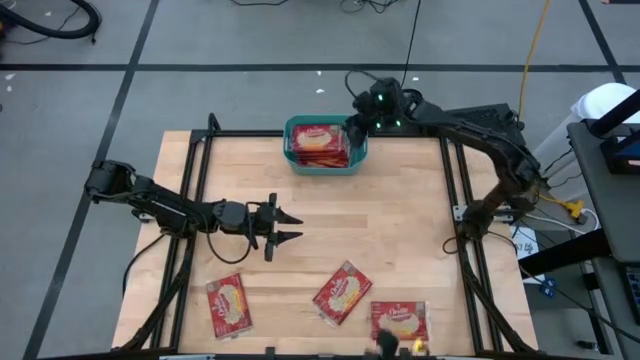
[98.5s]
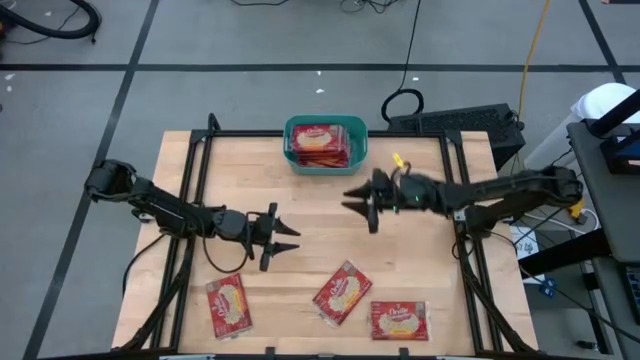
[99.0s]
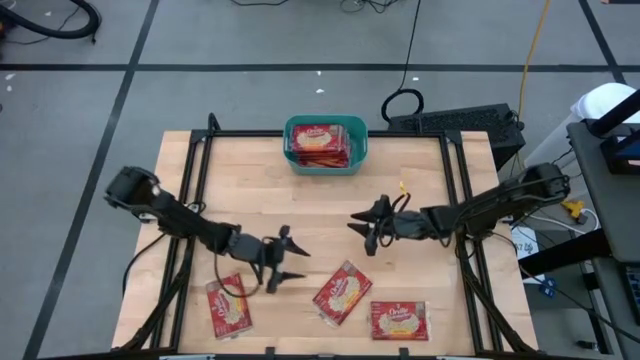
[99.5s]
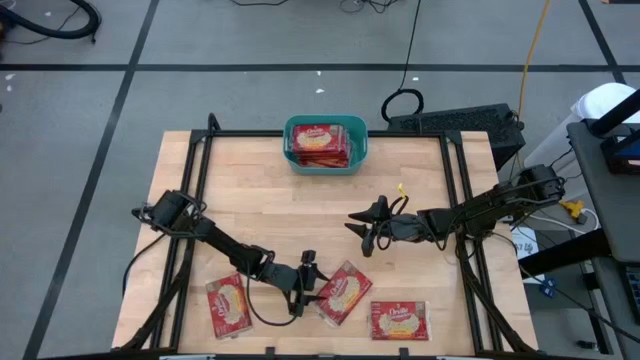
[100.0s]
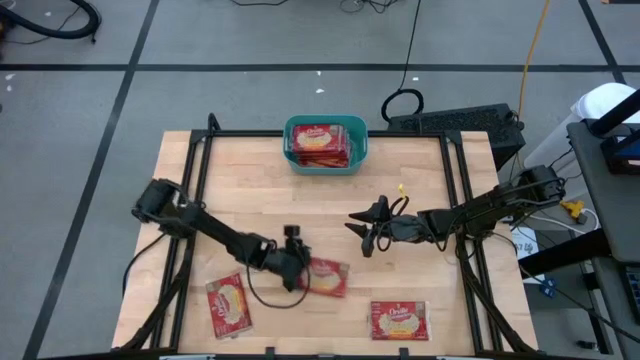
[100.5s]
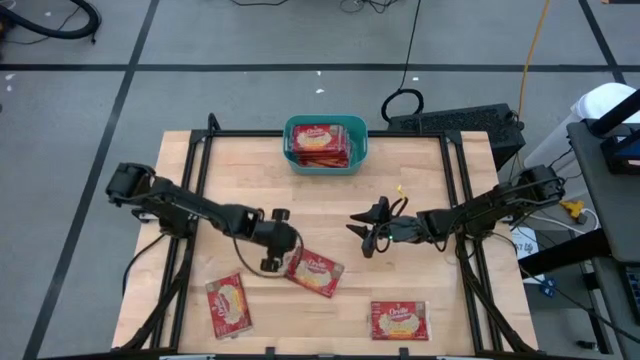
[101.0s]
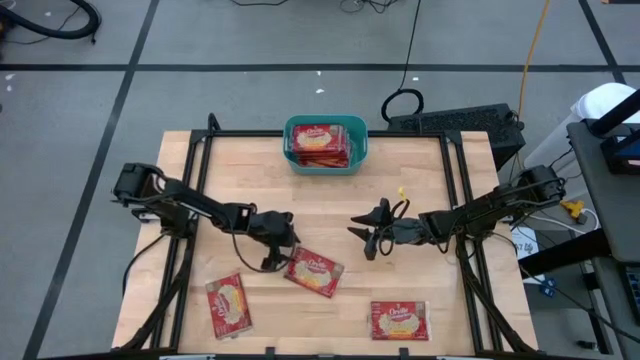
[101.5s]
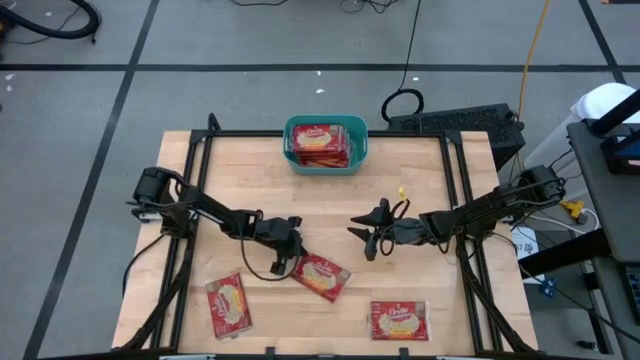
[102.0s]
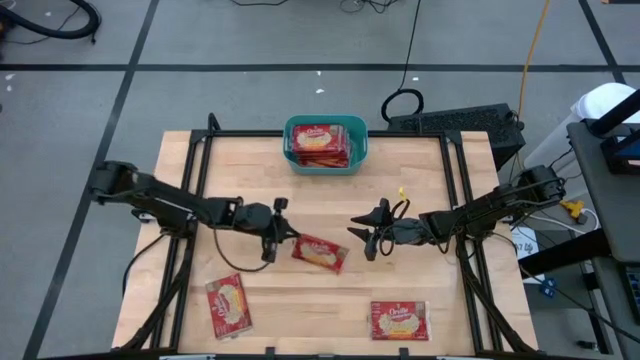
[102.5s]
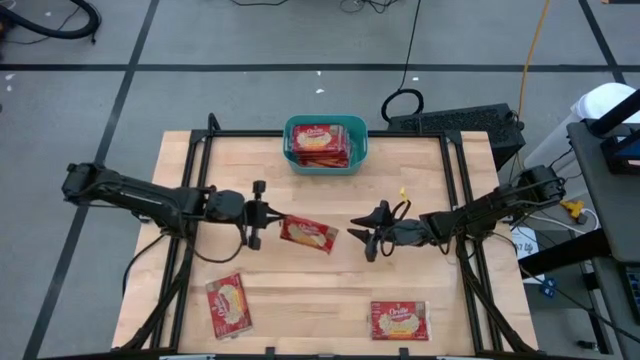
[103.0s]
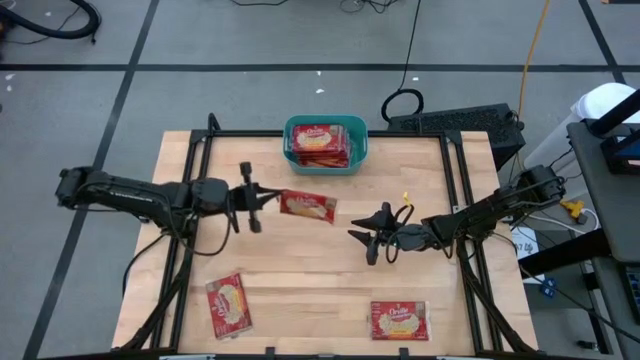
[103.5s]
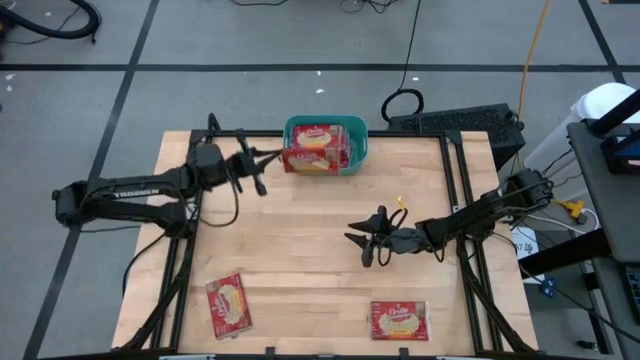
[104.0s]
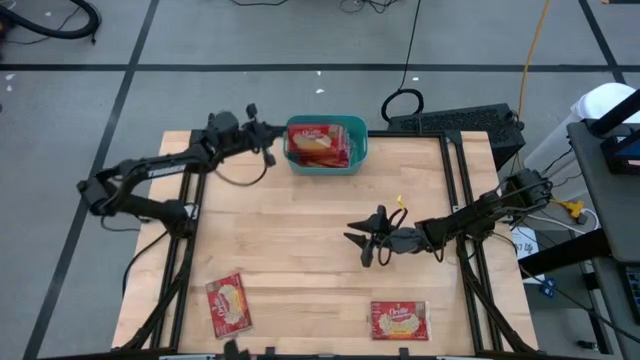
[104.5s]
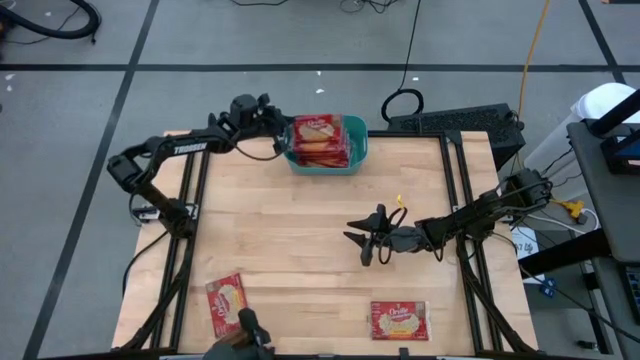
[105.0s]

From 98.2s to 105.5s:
Task: Sort popcorn bags into baskets
Put the red popcorn bag into the green bin

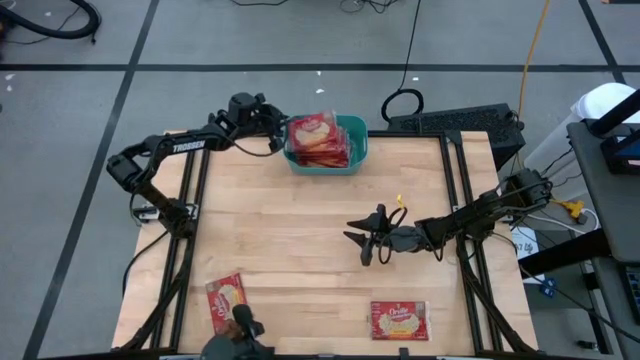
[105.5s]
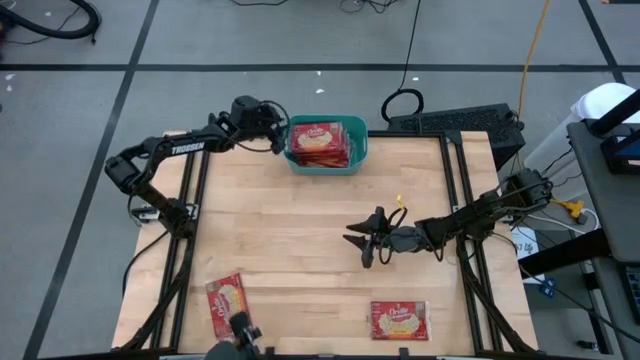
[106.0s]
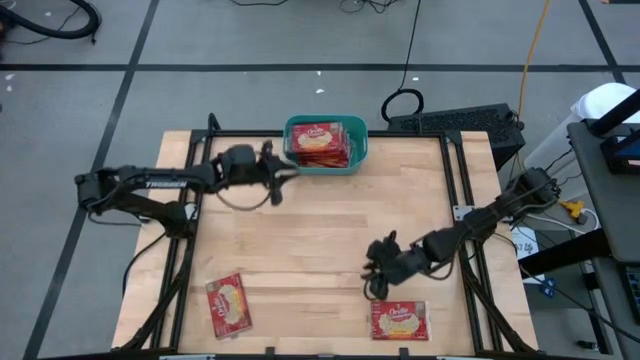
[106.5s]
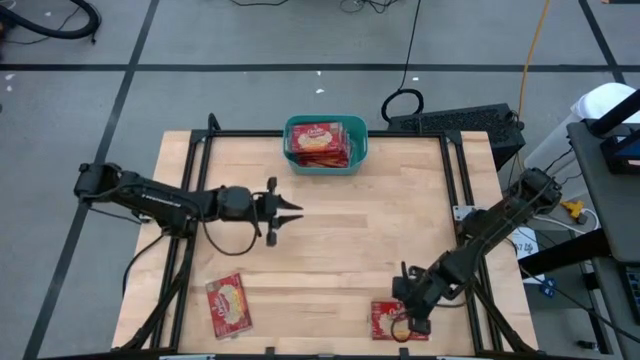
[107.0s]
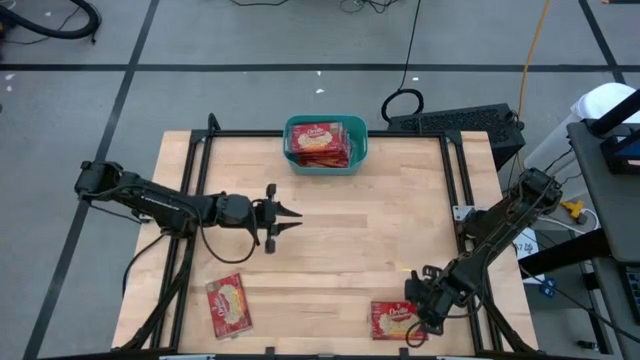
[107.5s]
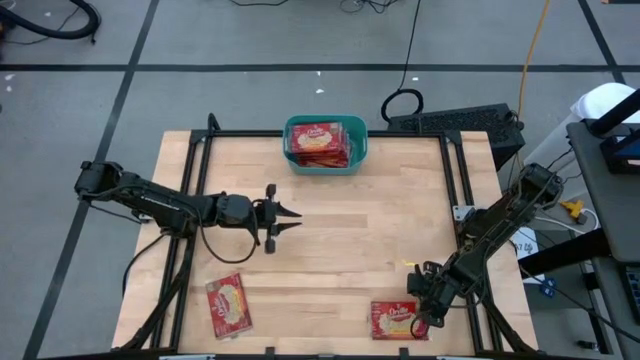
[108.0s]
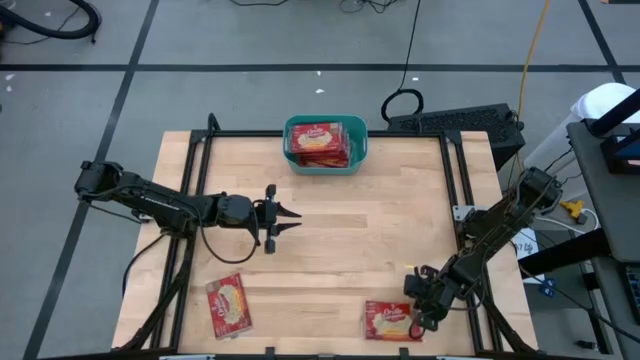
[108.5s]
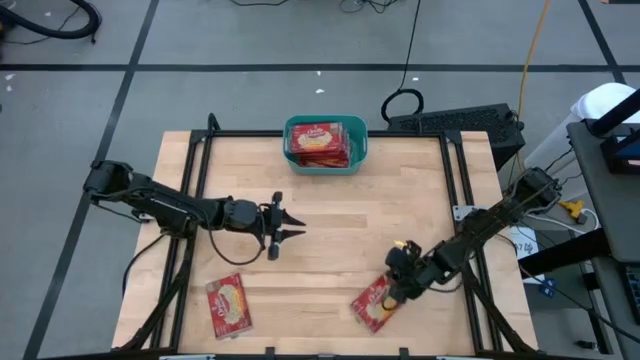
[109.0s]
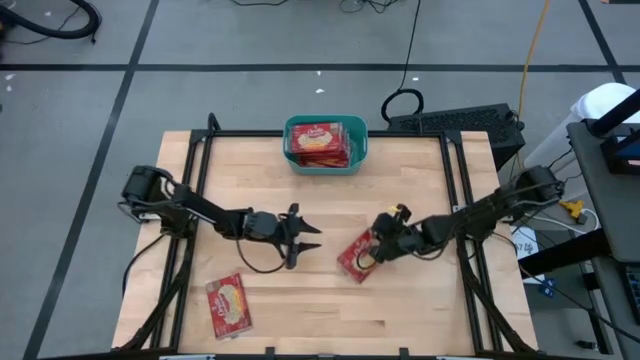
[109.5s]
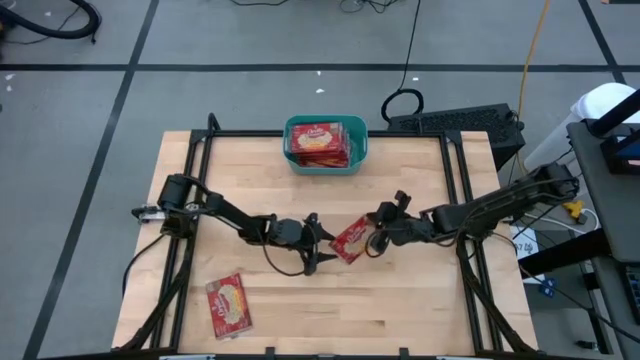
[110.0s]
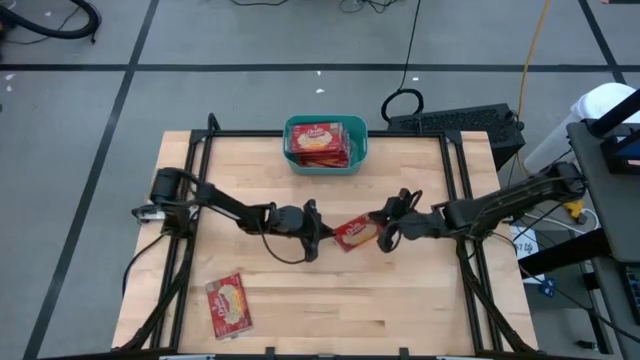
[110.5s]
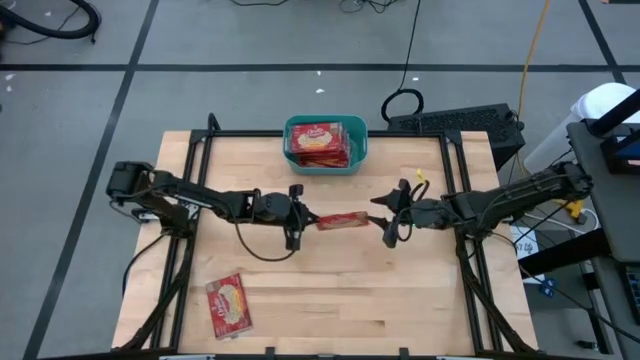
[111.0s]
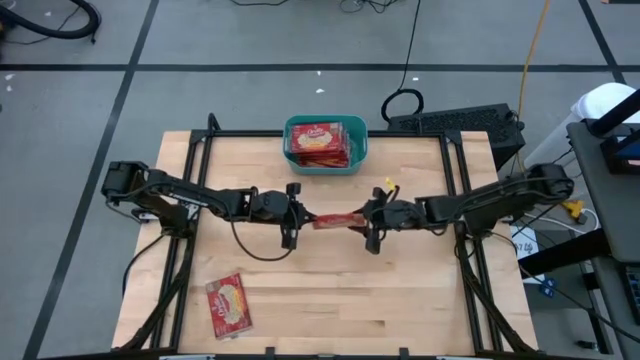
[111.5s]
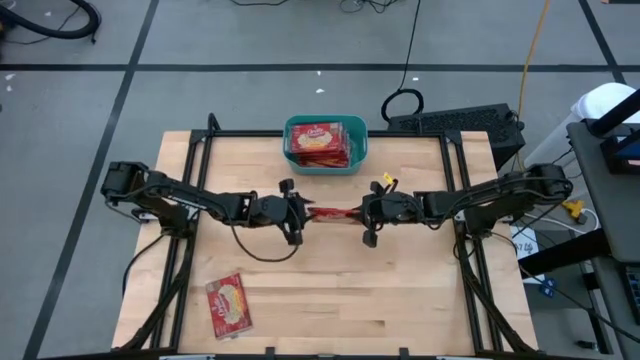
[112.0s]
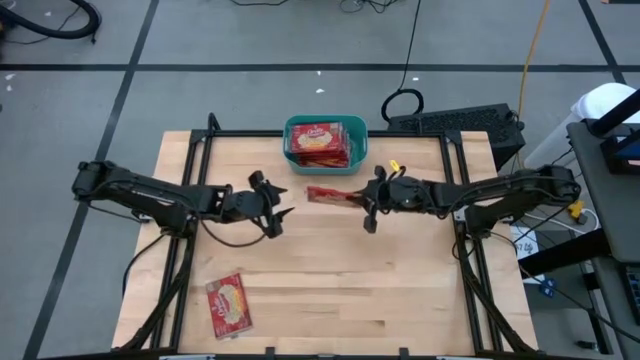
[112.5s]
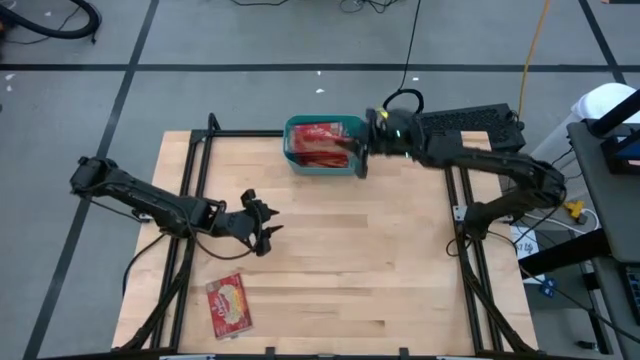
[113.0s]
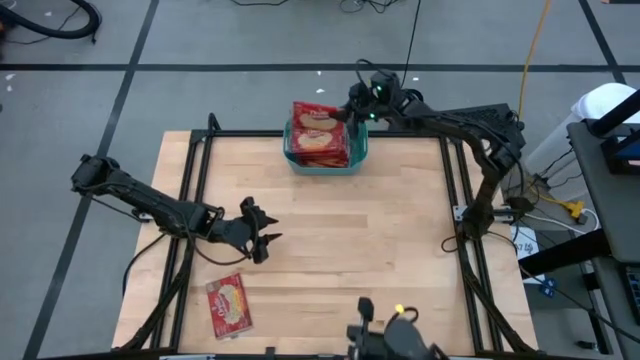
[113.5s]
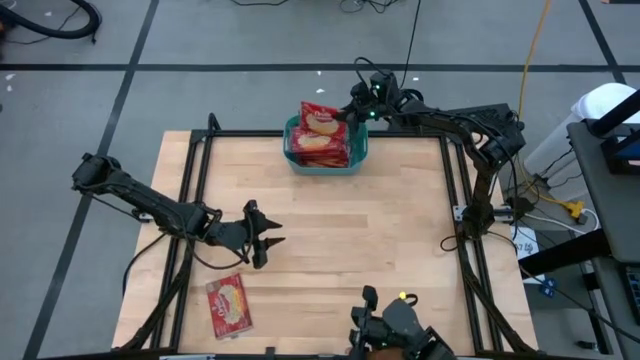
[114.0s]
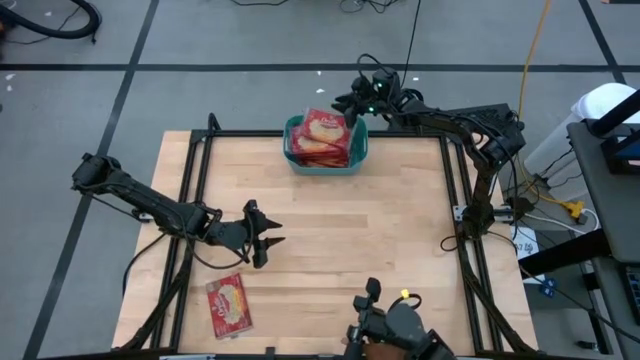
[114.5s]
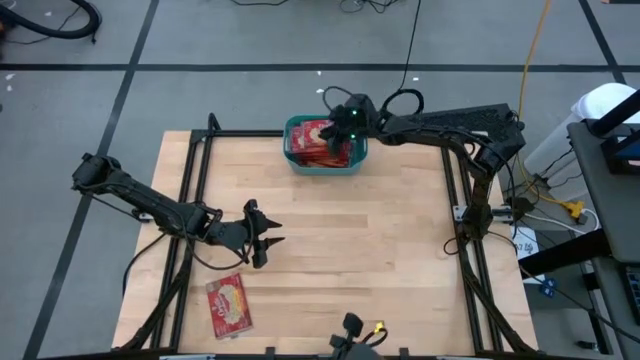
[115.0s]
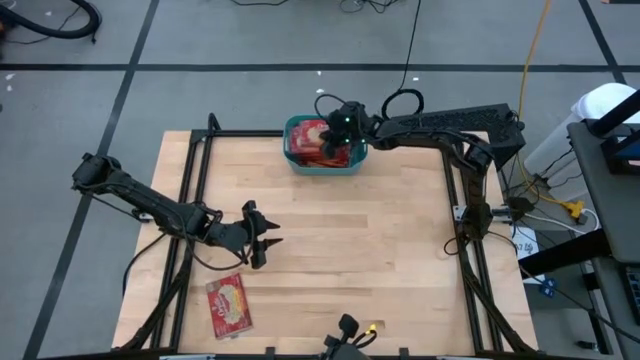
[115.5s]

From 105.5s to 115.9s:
Put the red popcorn bag into the green bin

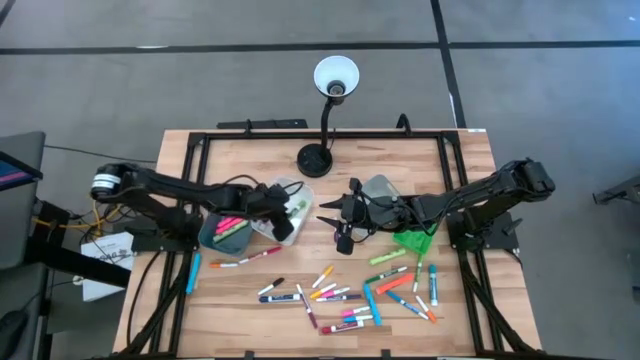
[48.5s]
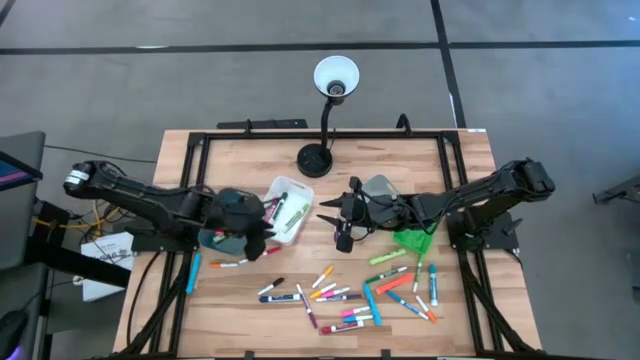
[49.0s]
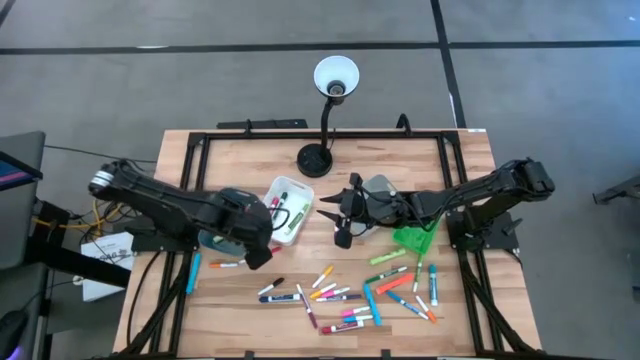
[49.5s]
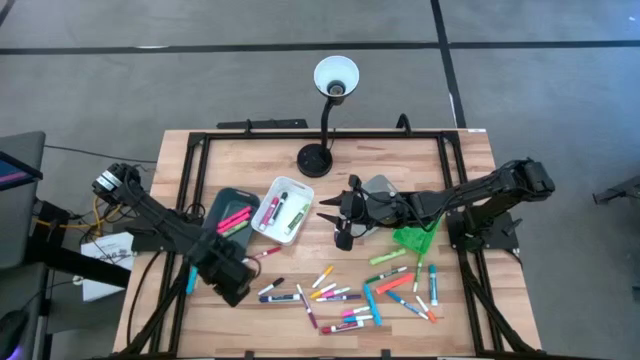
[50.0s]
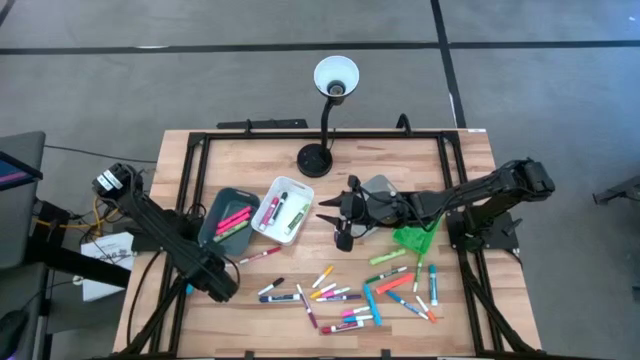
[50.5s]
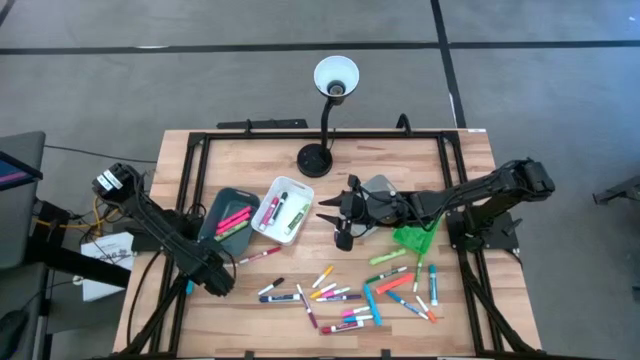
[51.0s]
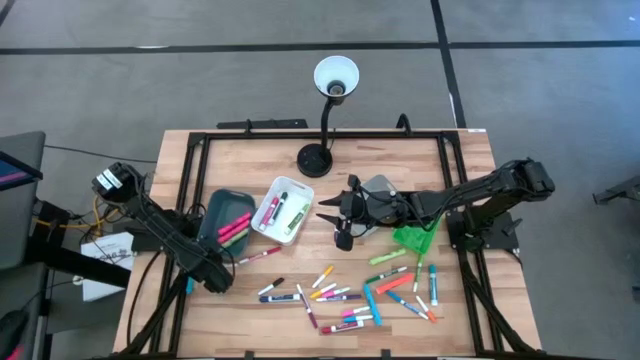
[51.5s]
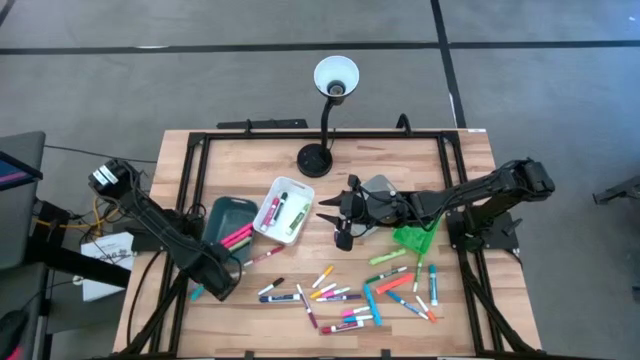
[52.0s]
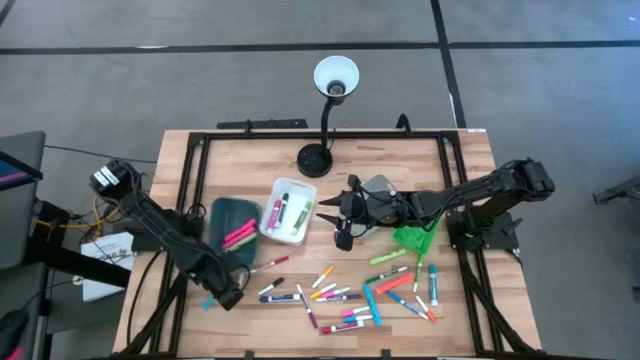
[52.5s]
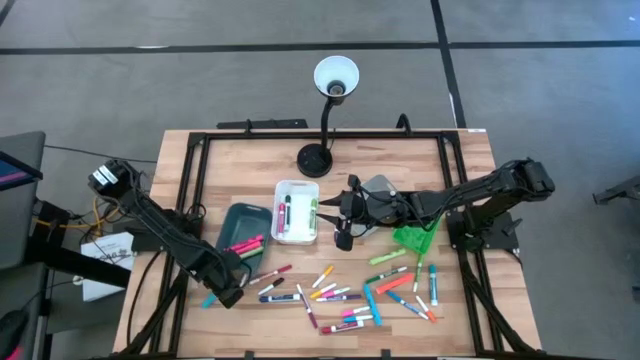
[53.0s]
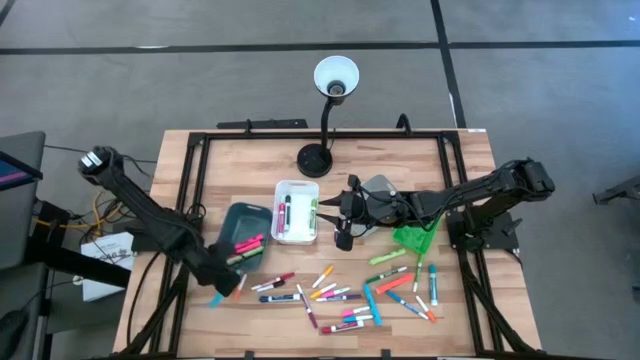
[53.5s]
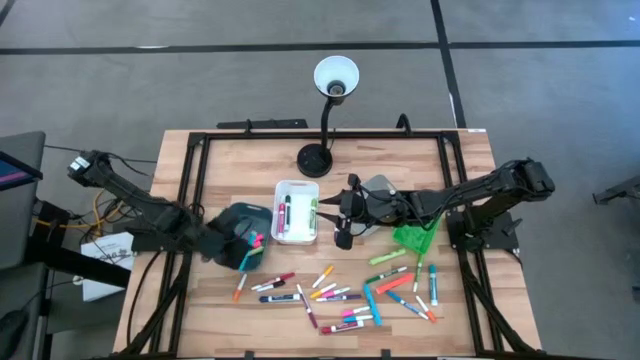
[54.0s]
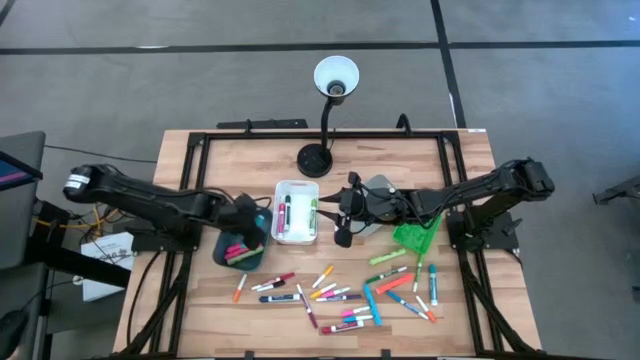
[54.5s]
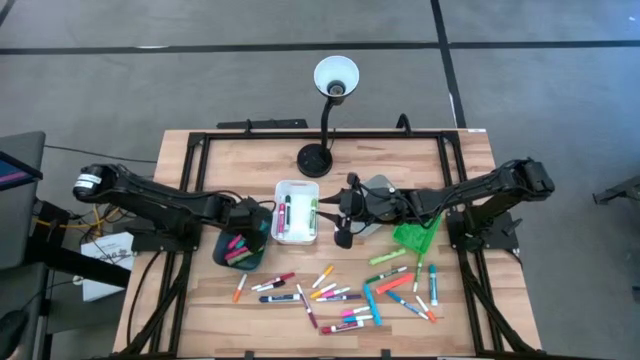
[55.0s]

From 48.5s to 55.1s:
Task: Pick & Place Markers
Put the left light blue highlighter into the blue bin
